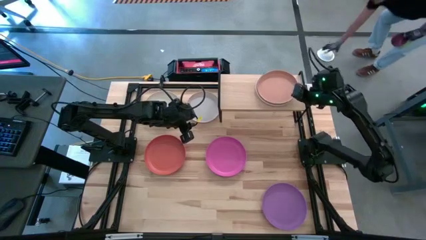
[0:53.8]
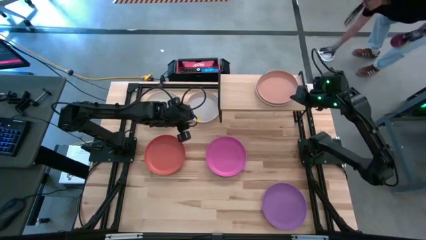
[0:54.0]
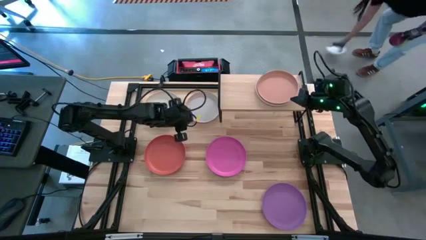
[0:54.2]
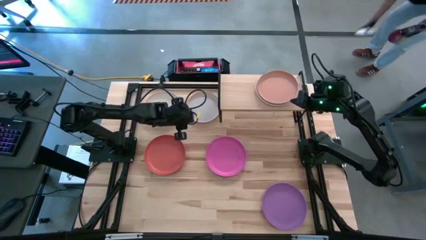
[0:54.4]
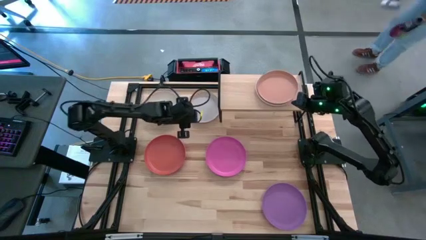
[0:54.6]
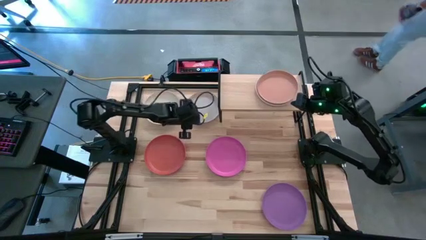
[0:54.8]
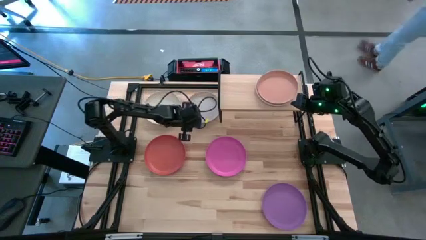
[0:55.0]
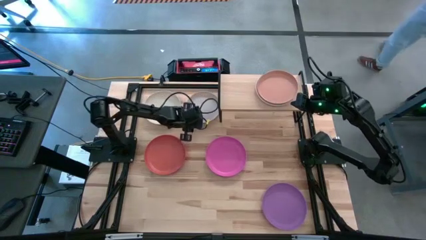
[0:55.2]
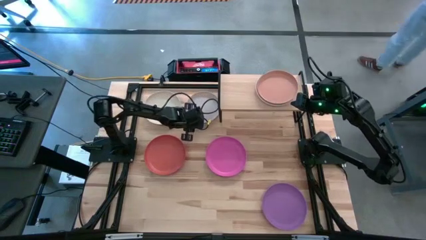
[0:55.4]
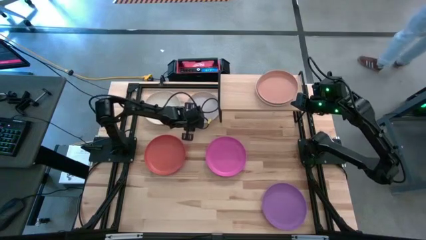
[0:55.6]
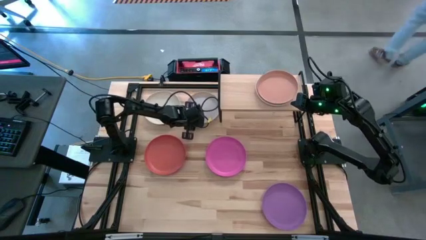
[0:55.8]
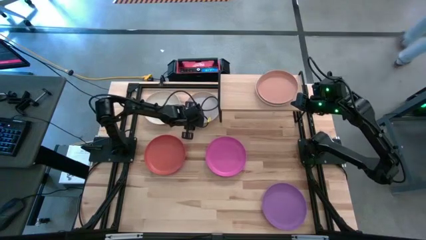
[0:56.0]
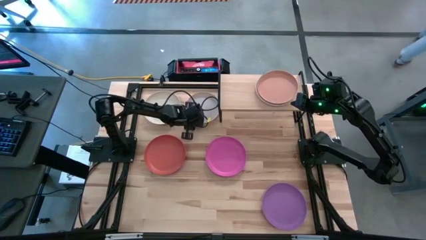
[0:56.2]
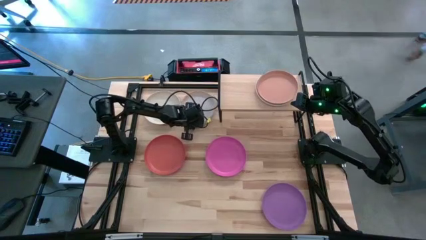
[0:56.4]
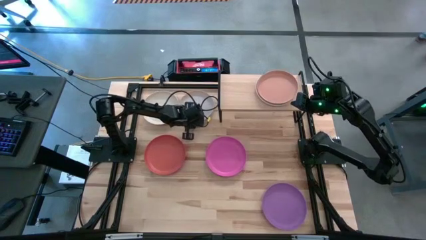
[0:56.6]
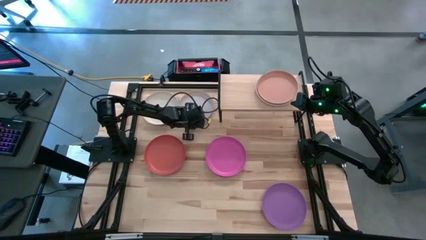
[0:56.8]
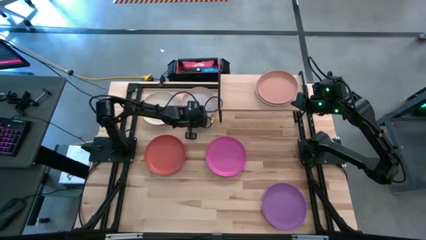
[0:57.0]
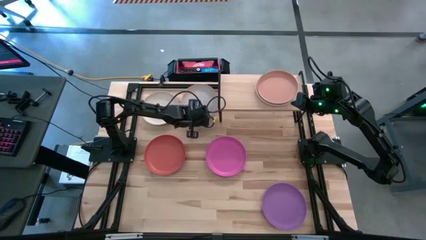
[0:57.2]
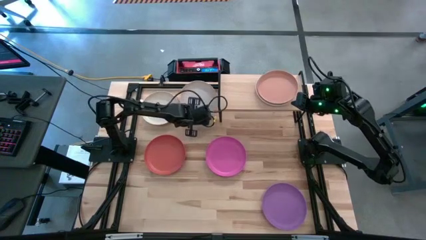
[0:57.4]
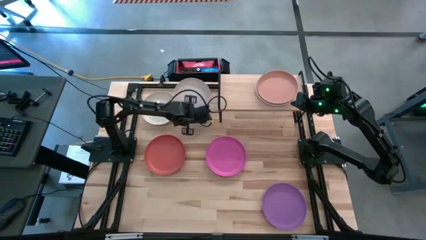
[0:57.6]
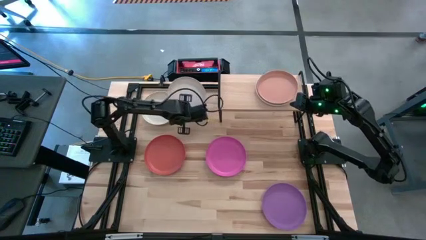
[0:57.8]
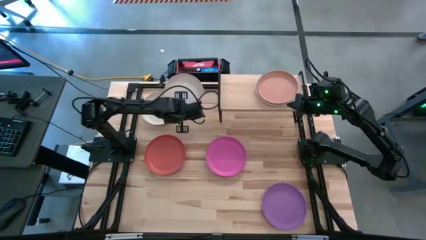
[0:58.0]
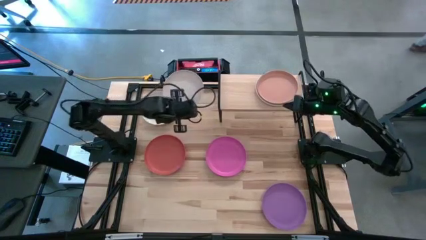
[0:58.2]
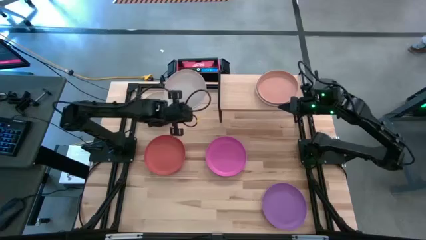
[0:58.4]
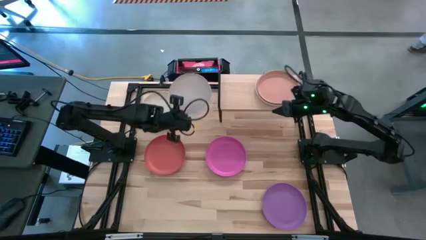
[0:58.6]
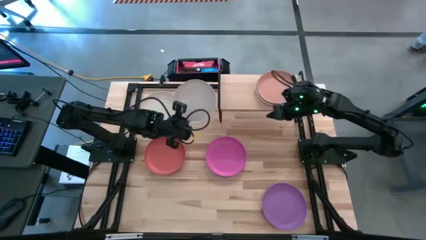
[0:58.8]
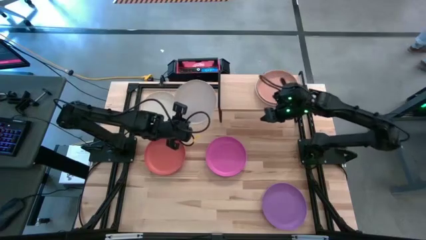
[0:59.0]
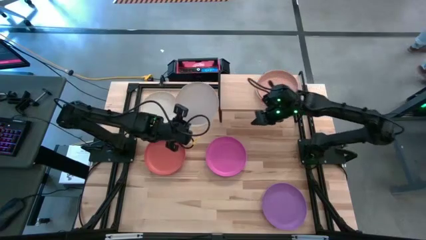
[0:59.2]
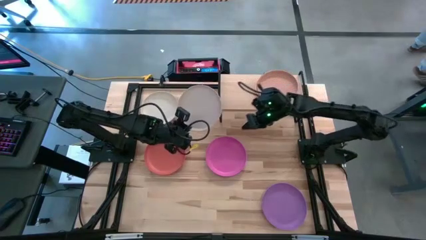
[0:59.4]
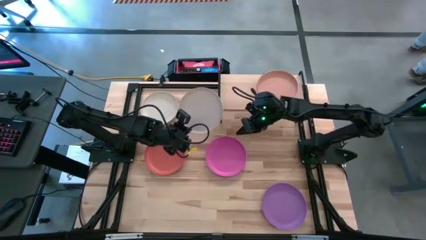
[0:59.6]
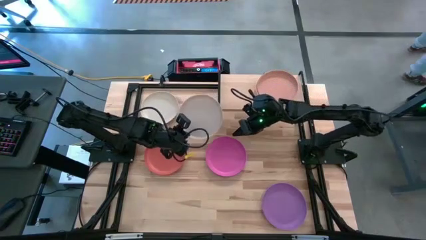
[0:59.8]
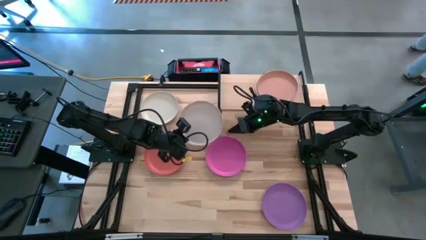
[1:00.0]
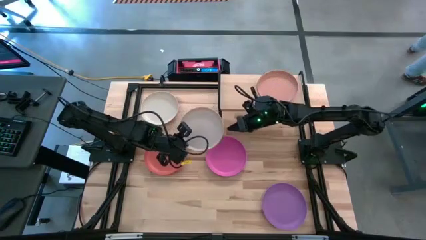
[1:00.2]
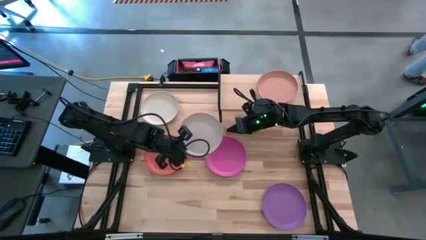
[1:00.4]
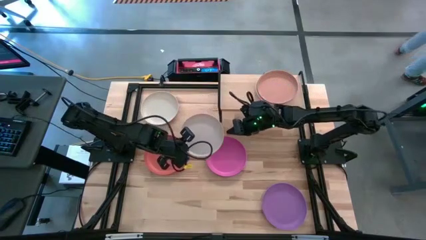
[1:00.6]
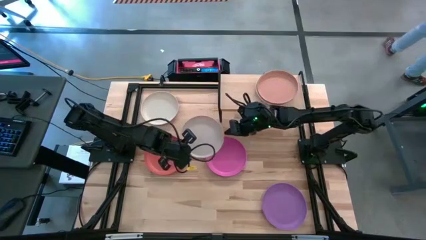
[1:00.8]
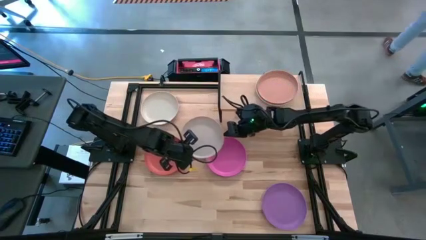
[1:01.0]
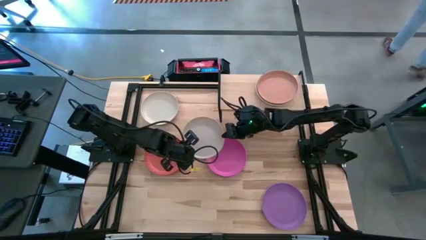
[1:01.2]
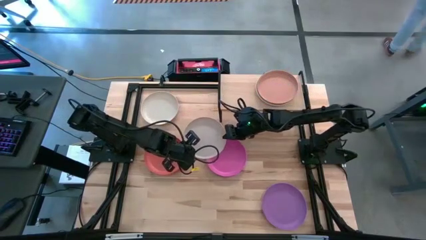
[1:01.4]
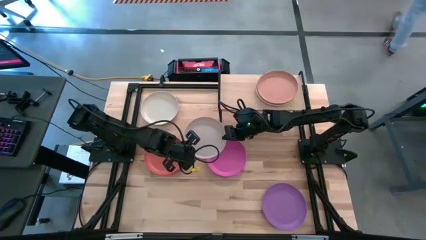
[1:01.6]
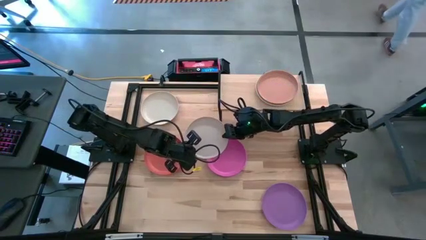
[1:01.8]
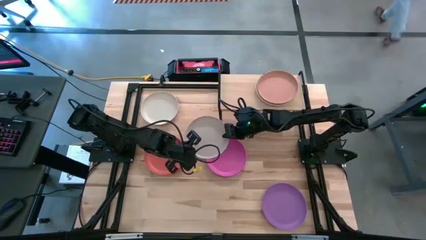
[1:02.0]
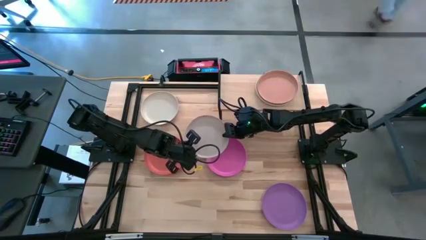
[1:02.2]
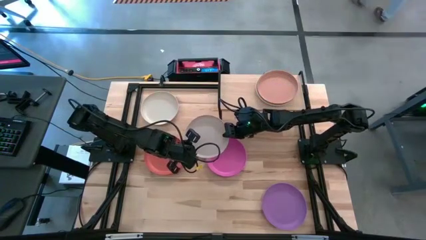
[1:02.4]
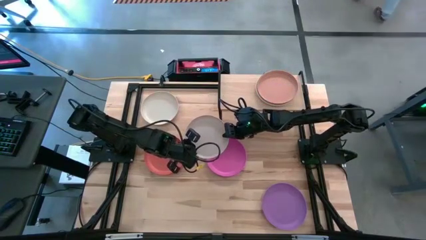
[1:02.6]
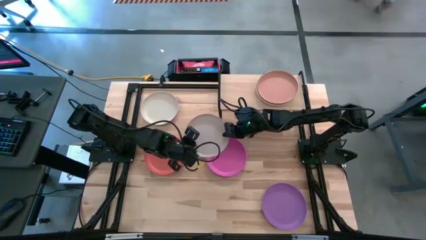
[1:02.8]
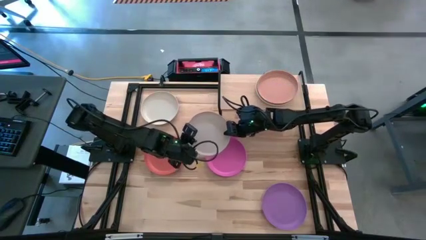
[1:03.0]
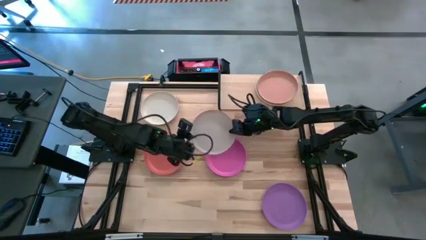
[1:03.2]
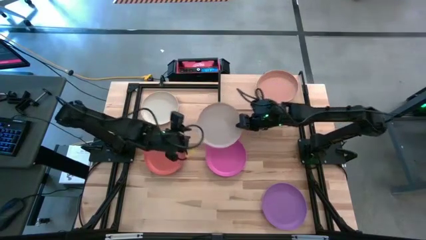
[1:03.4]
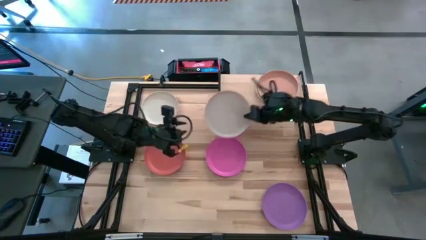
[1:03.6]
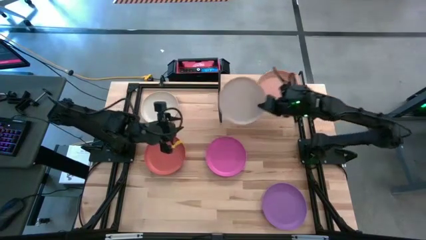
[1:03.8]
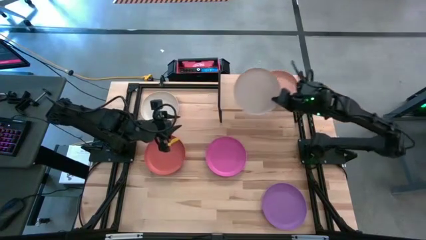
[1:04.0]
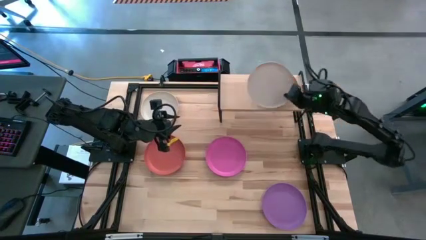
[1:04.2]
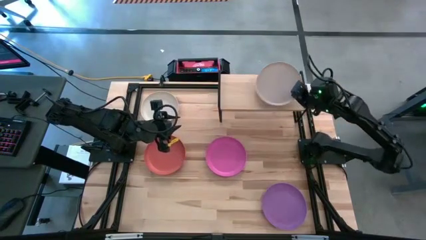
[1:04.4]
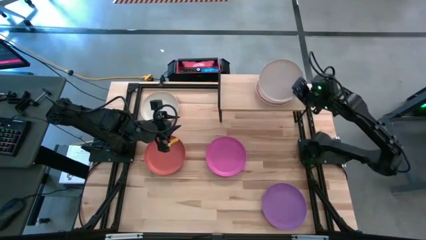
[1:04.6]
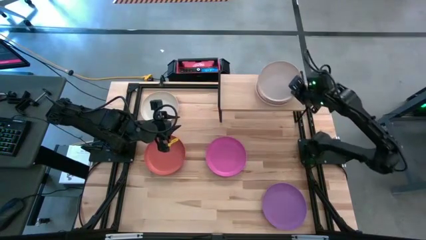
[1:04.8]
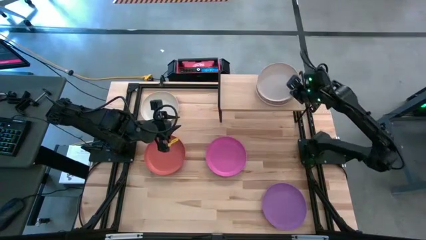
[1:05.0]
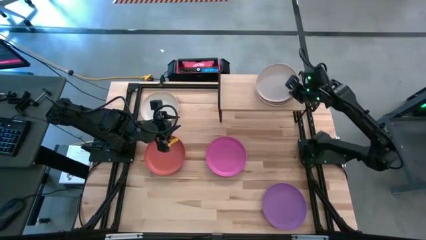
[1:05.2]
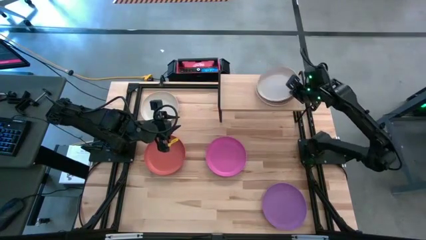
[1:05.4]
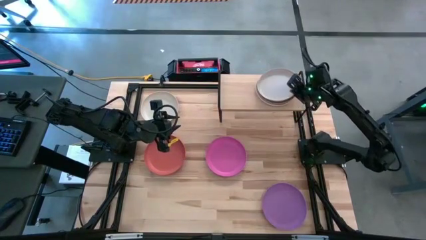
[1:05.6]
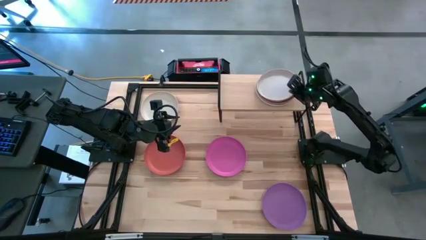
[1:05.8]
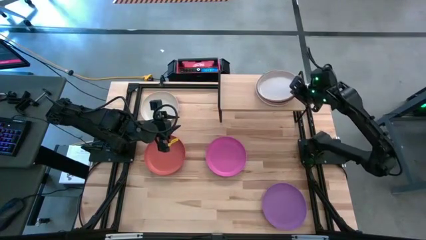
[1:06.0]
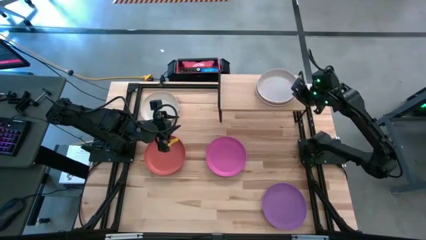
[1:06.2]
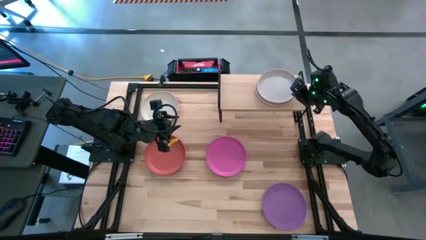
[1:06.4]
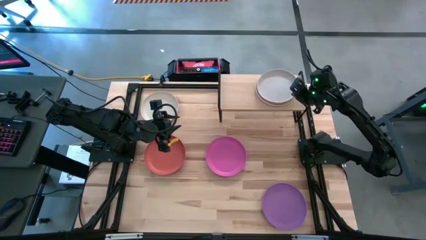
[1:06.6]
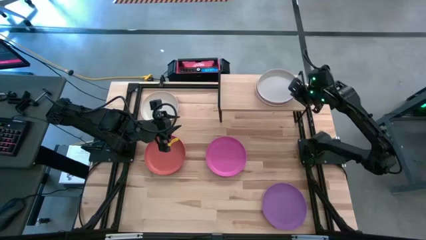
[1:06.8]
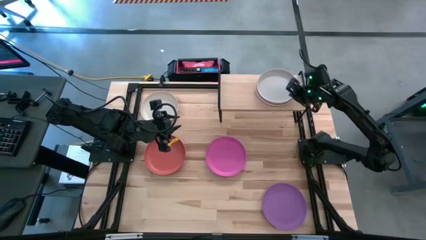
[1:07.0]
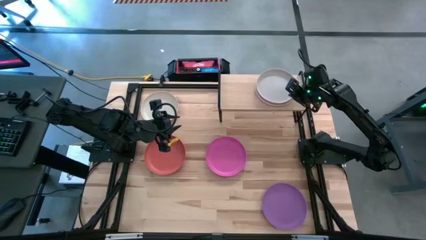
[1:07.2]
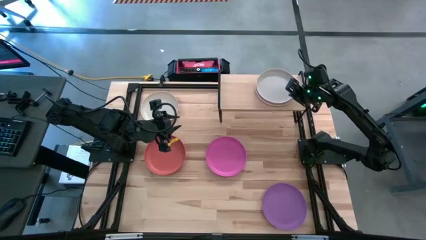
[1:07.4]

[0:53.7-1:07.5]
Task: Place and stack plates onto a shelf
Stack the light brown plate on top of the brown plate on the shelf

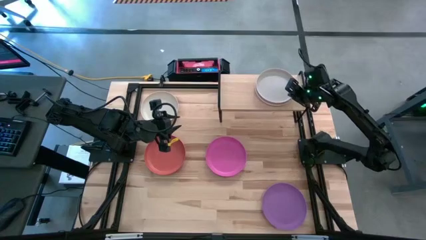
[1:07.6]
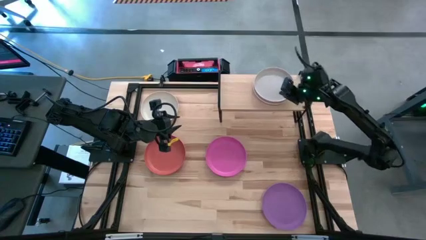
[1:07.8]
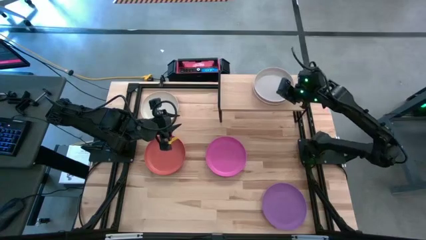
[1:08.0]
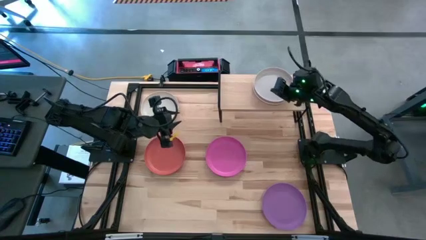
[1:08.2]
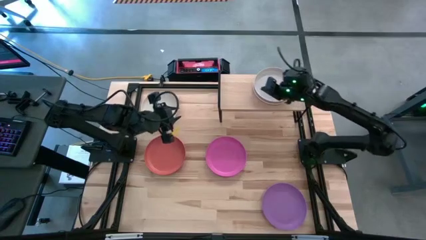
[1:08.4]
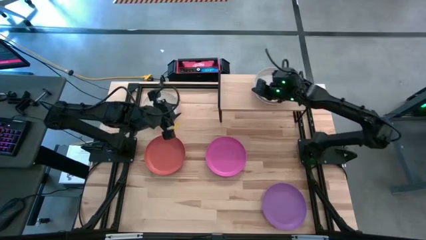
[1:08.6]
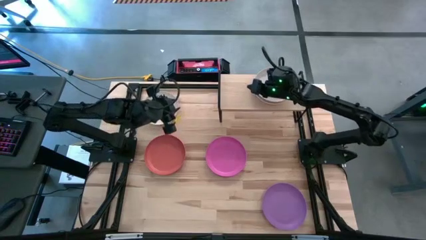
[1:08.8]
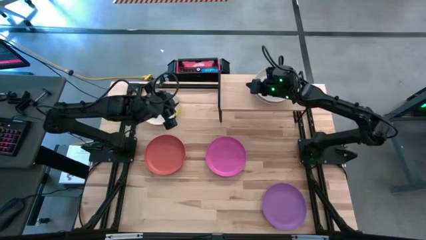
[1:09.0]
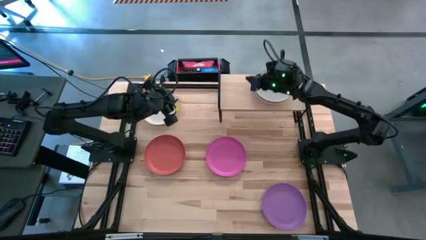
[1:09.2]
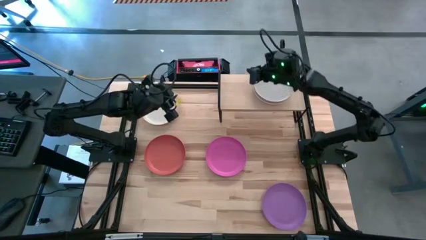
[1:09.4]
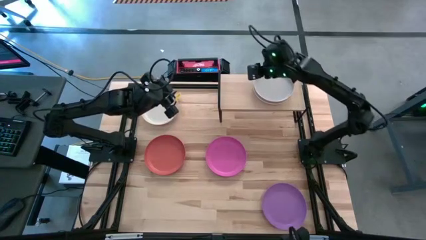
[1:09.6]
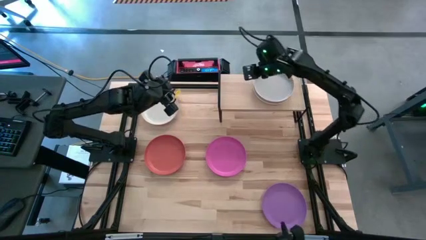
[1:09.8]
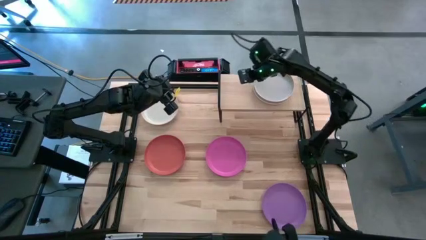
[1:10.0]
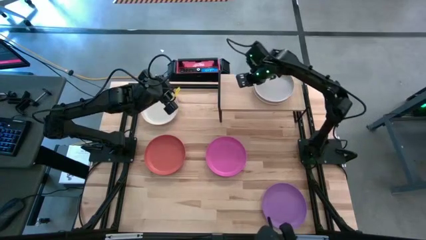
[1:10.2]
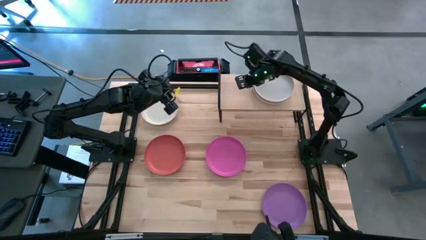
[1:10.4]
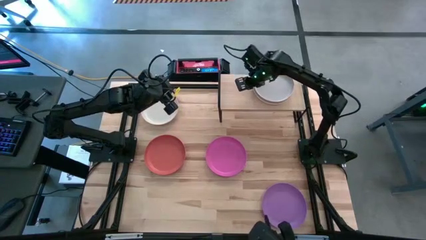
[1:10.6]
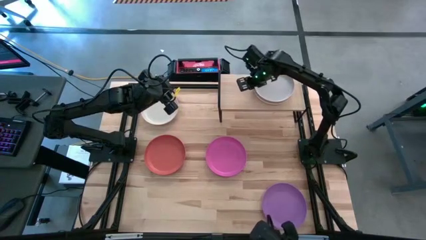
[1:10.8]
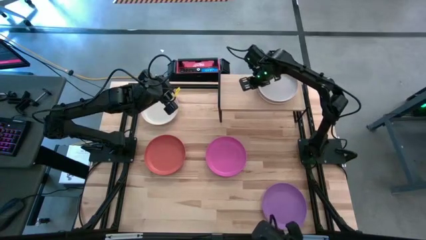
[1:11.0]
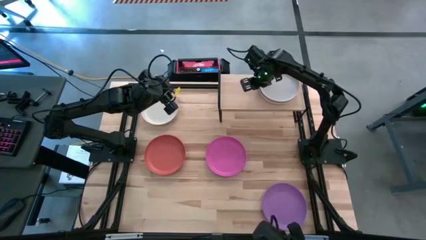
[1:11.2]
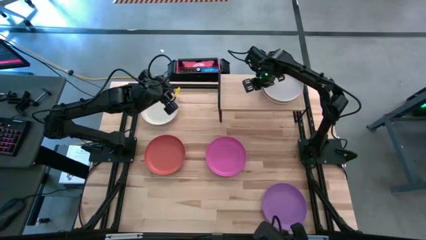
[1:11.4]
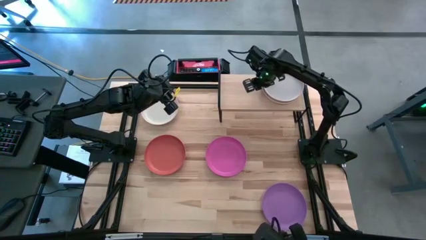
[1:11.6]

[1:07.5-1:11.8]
Adjust the stack of colored plates on the shelf
